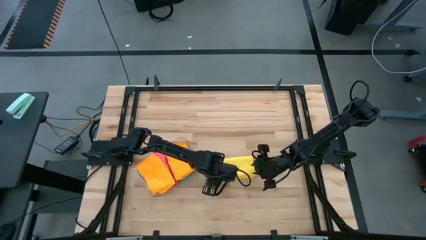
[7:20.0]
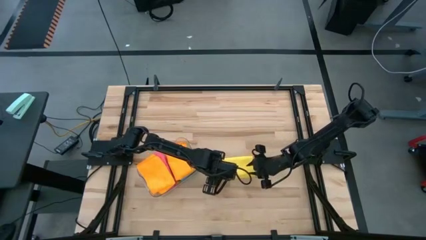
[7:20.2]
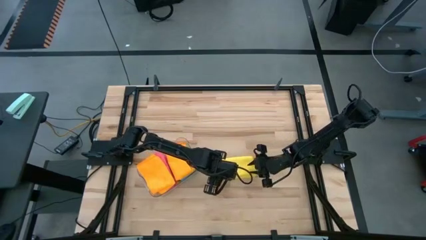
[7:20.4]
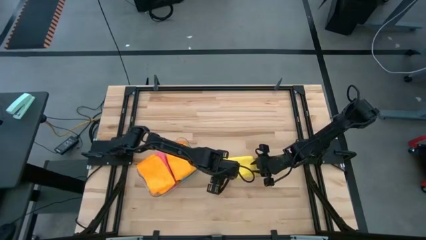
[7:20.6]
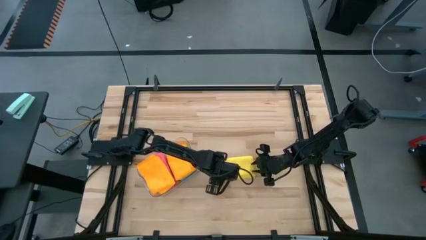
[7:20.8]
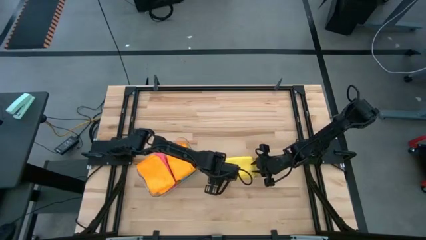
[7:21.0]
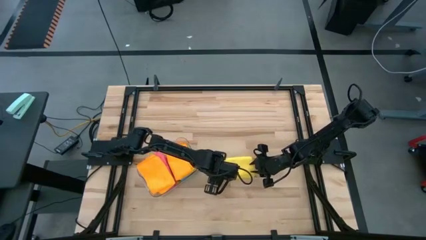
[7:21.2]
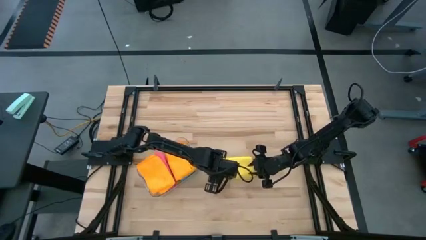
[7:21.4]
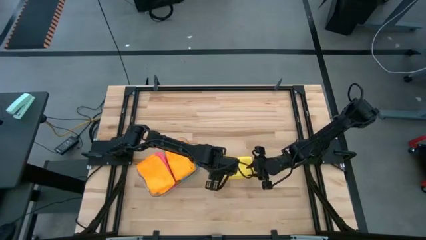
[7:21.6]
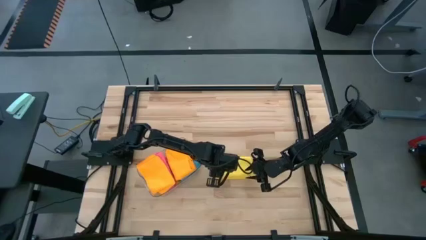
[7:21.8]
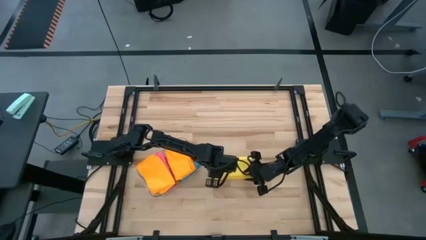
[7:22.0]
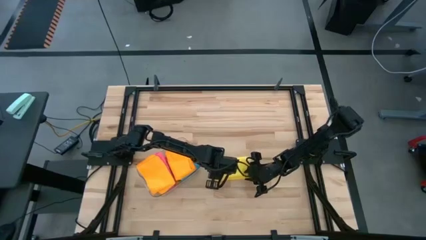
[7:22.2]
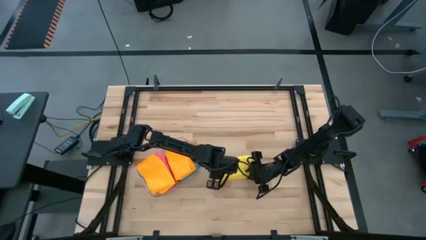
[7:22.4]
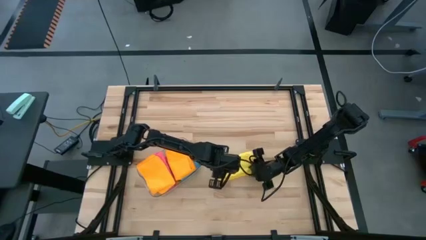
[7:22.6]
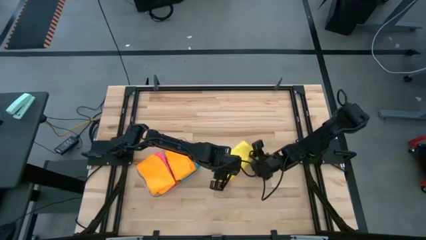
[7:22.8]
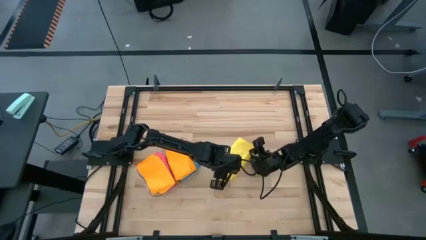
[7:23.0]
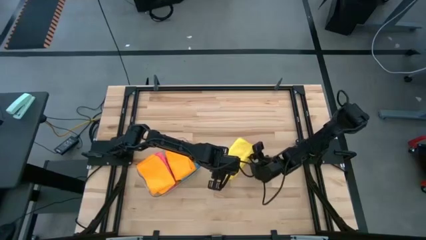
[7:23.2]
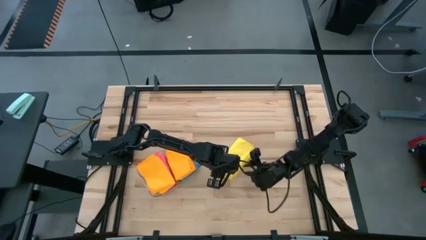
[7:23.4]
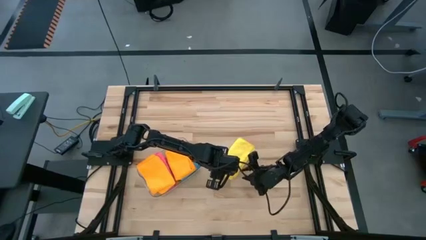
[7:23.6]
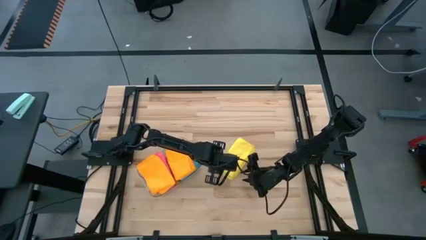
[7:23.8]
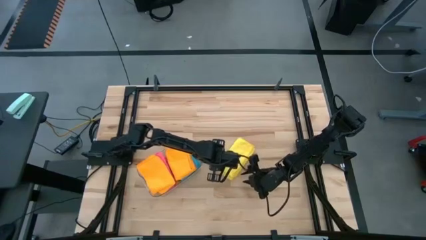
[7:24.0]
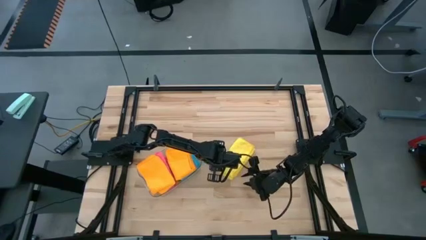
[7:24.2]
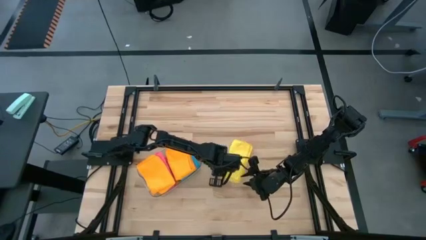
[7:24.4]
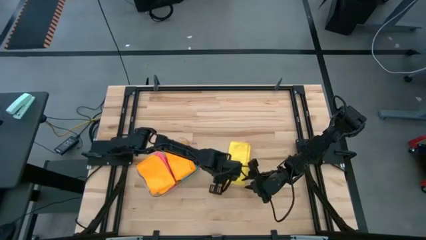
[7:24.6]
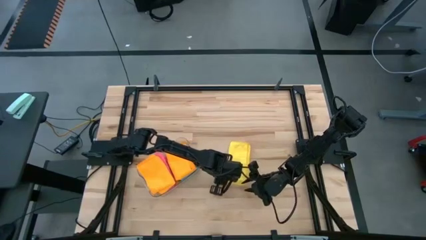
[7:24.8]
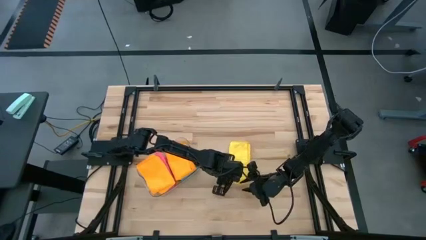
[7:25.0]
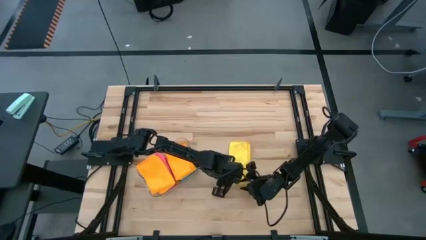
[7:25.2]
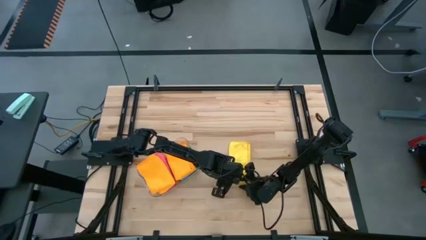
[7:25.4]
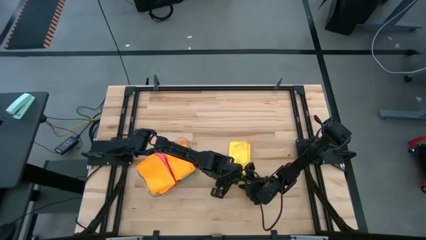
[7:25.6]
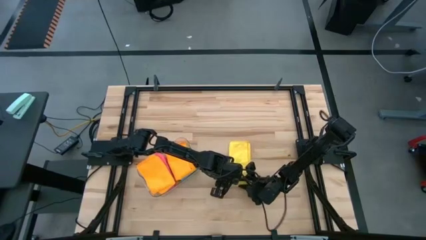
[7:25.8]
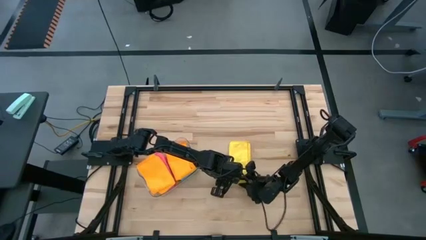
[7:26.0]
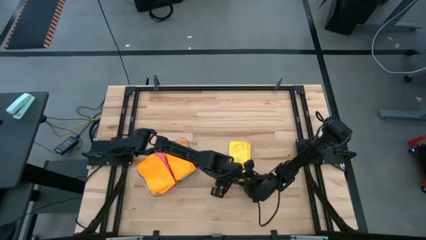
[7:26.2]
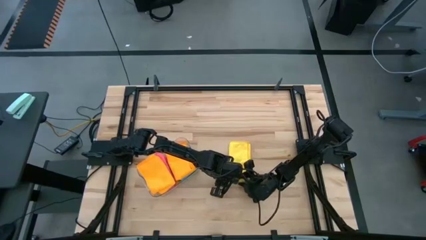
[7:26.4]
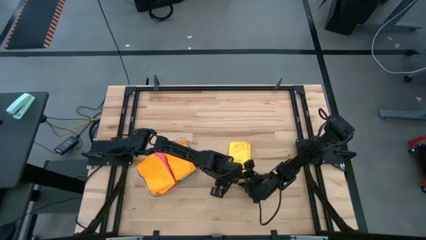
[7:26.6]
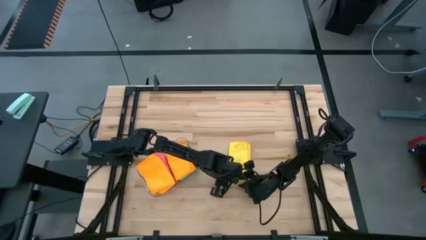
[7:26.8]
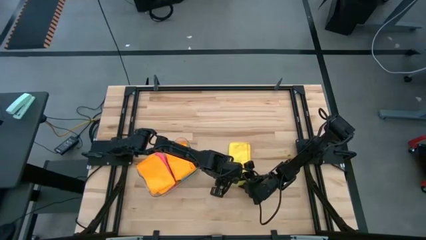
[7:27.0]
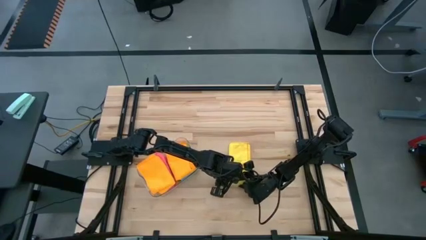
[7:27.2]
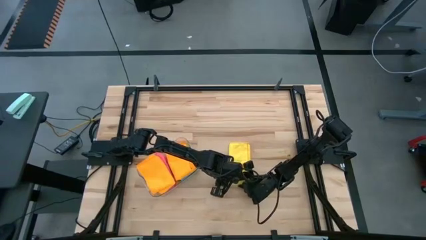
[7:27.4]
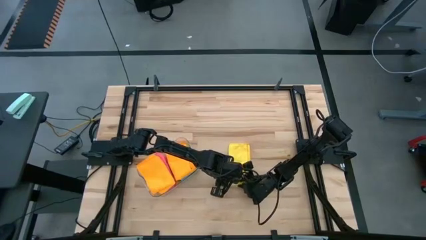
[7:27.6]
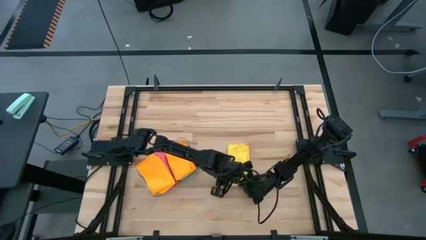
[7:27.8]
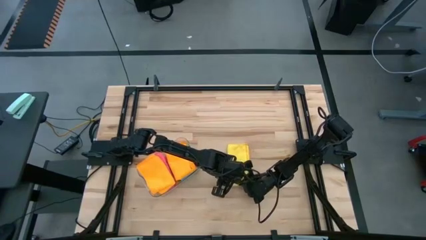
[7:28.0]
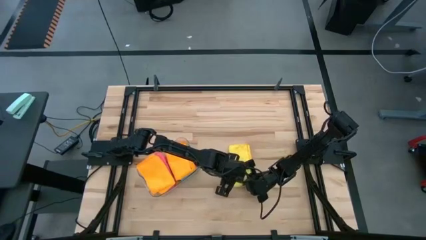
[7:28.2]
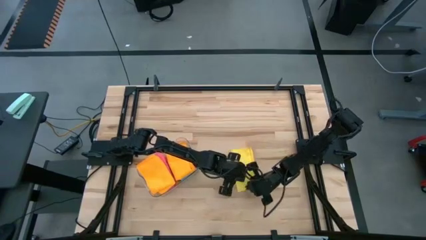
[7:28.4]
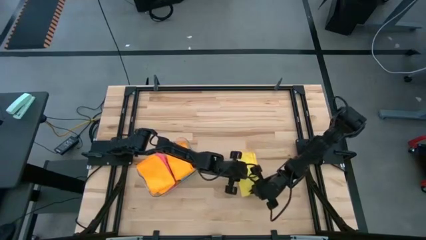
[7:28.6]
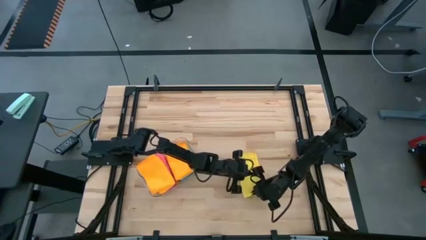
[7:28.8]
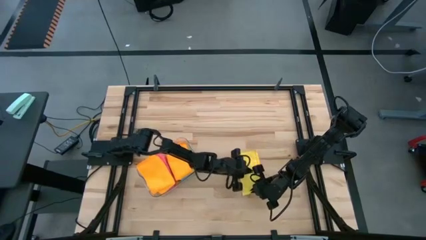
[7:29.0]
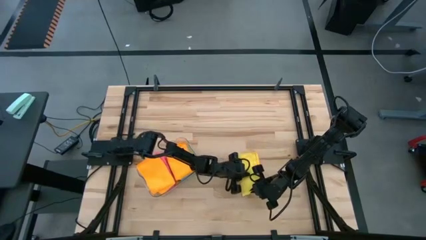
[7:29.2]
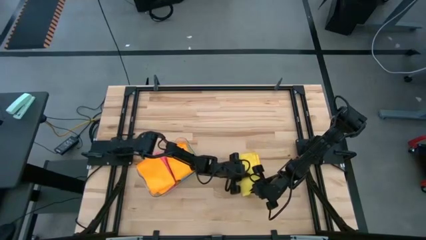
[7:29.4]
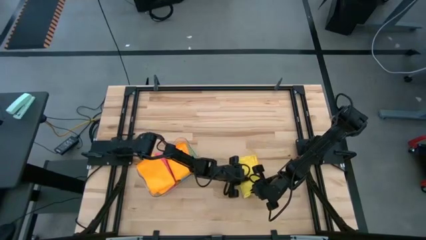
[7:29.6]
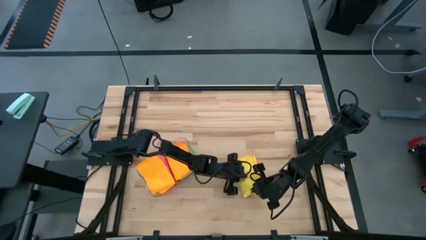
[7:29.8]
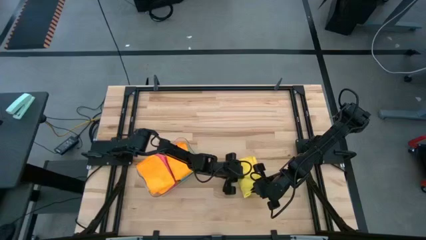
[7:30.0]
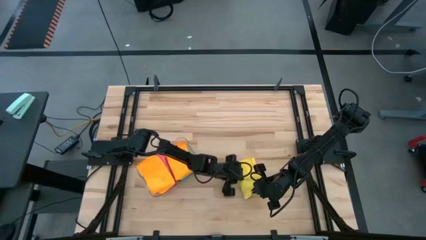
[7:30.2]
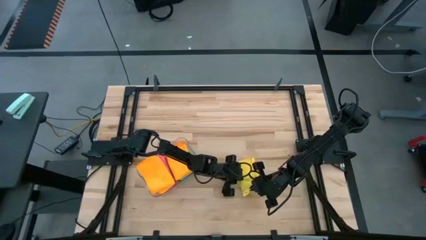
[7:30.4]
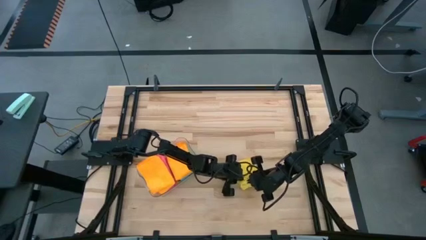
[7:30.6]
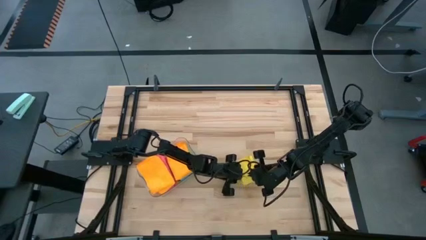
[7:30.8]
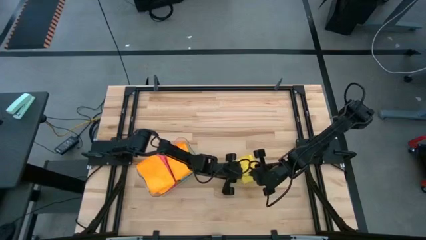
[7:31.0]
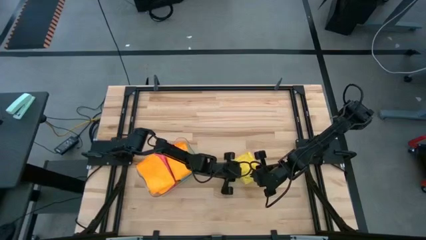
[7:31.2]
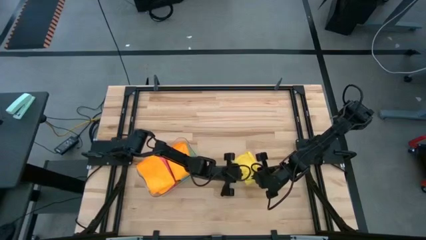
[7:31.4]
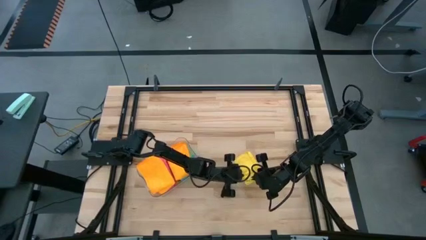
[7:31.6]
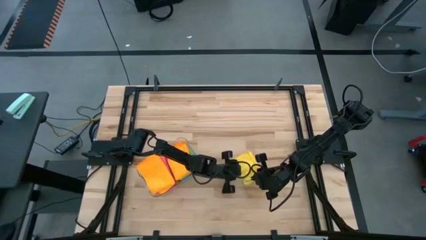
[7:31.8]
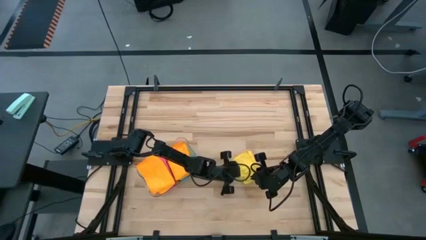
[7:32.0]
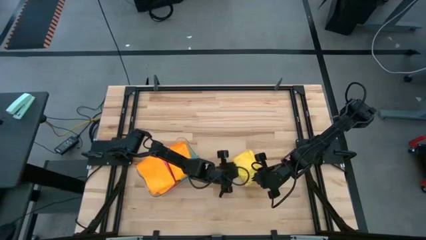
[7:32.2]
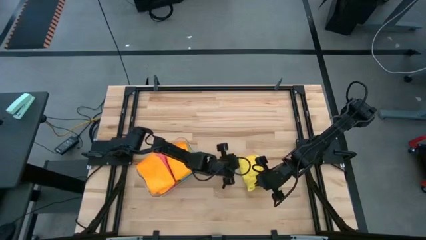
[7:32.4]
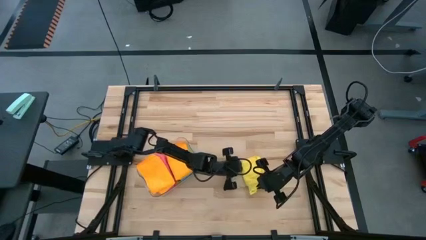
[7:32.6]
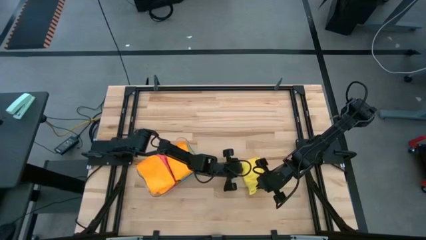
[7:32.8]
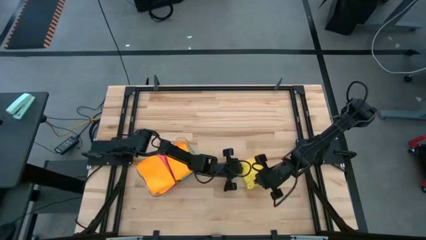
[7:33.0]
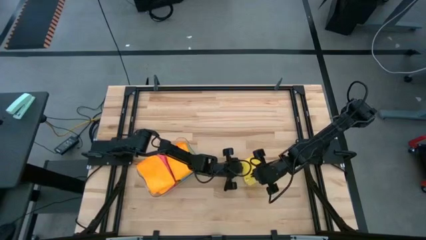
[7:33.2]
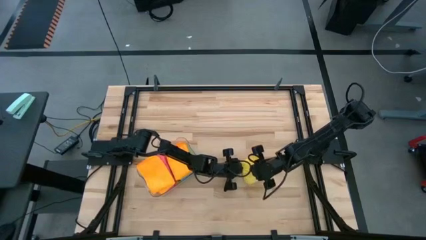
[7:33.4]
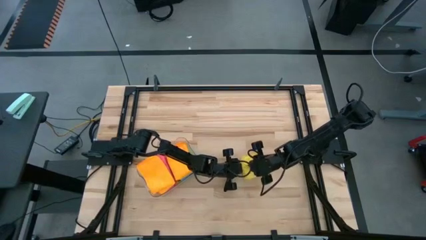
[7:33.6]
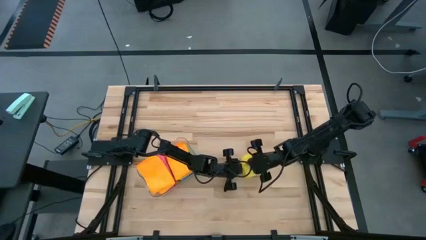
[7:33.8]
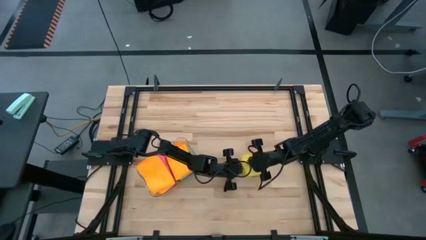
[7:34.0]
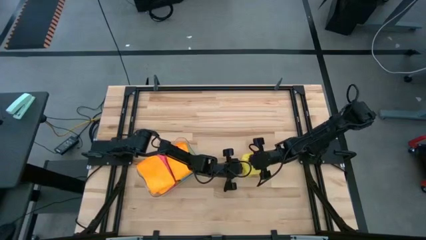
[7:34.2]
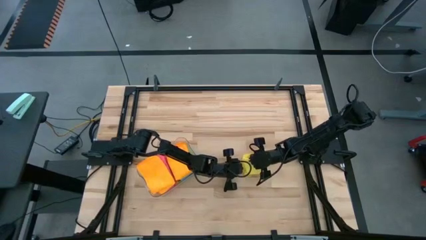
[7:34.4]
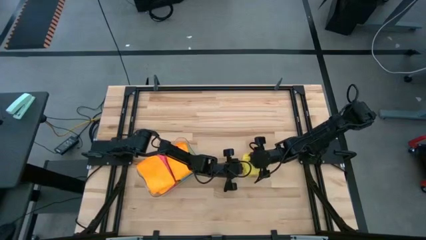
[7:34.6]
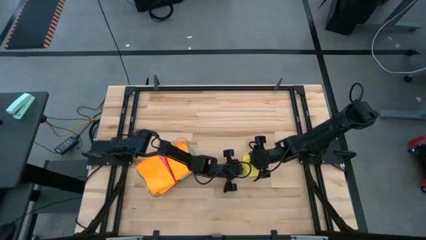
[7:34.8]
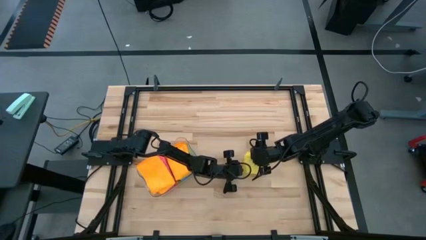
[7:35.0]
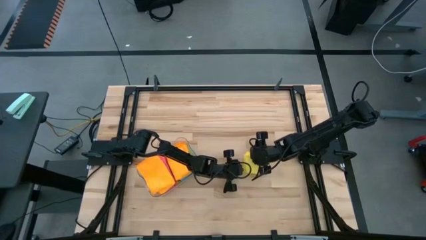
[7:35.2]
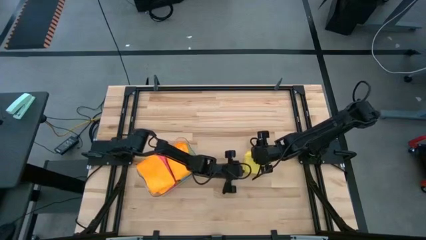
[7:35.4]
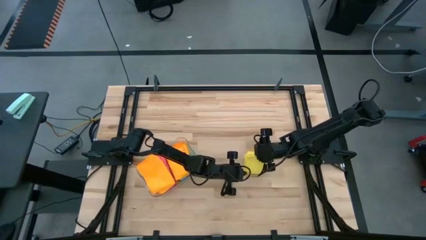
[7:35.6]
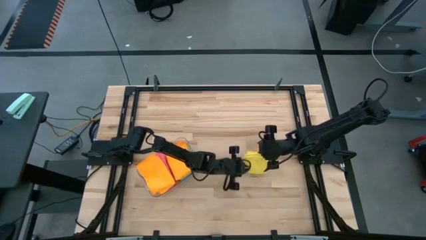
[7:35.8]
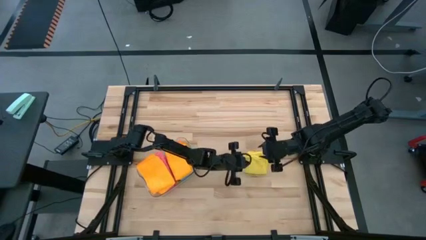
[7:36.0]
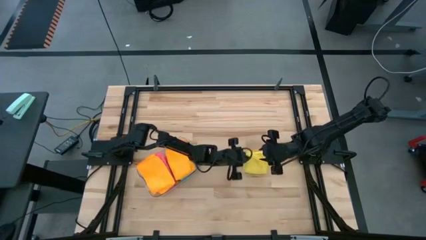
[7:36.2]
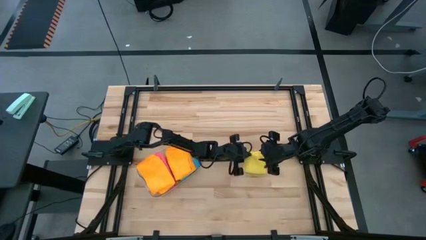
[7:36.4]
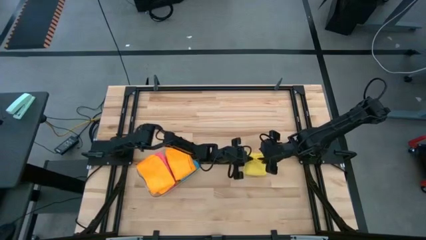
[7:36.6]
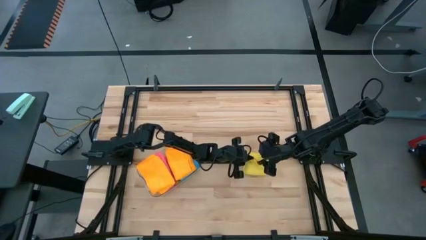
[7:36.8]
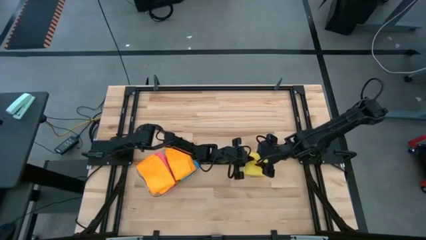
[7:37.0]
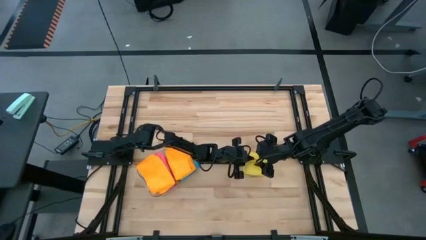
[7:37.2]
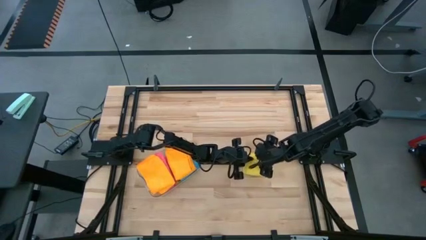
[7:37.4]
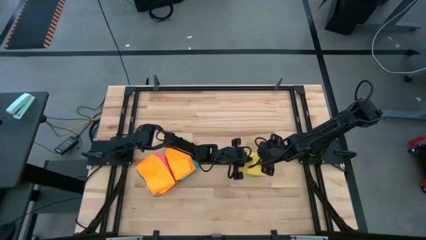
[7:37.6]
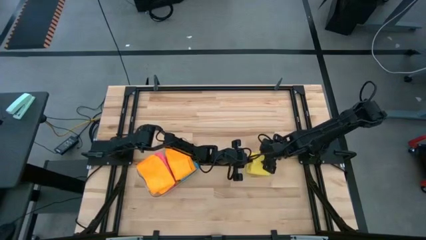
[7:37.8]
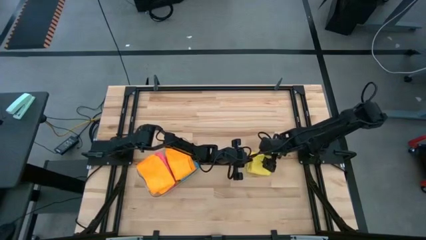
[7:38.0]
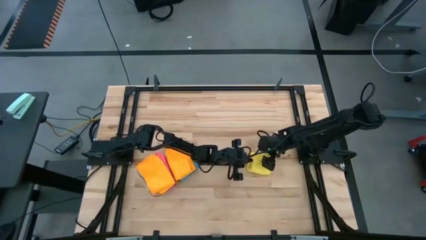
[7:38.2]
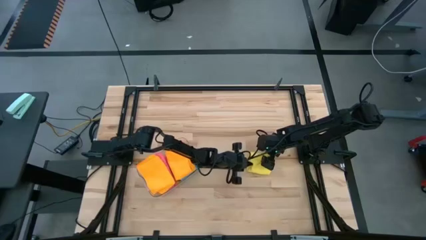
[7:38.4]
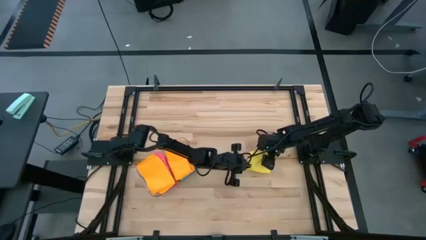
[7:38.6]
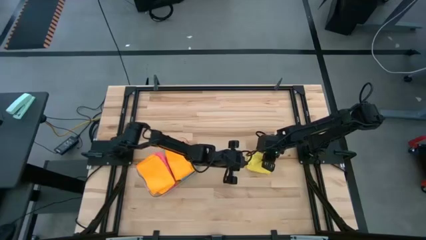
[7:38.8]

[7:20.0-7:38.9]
Task: Fold microfiber towels
Fold the yellow microfiber cloth
